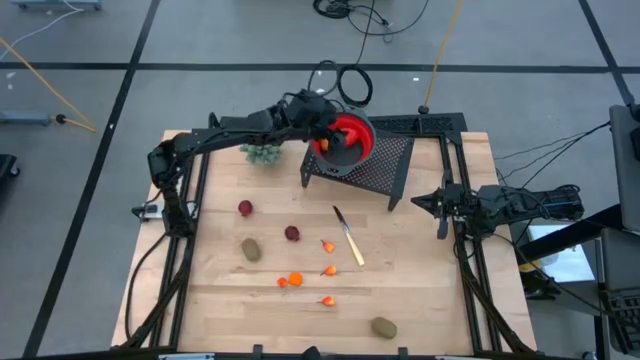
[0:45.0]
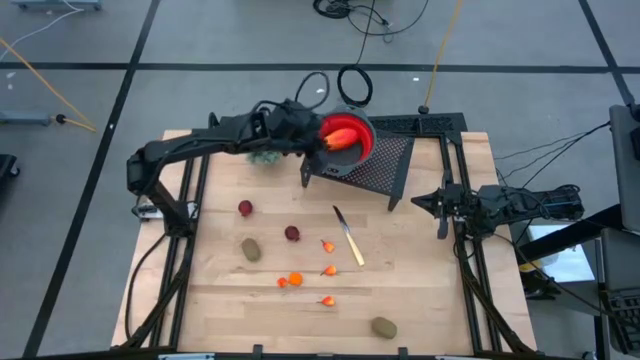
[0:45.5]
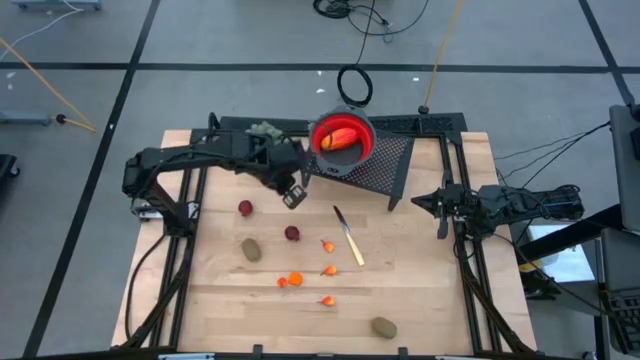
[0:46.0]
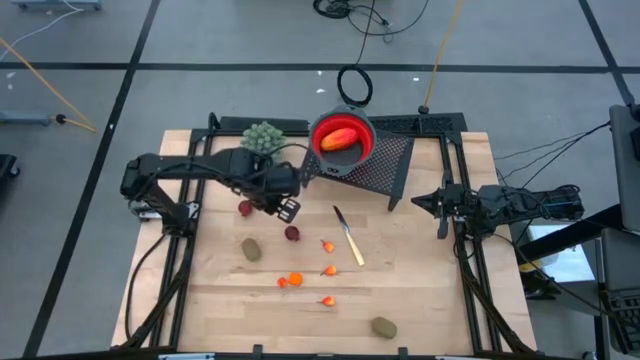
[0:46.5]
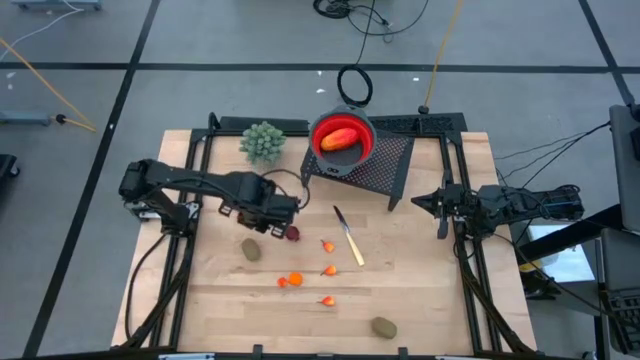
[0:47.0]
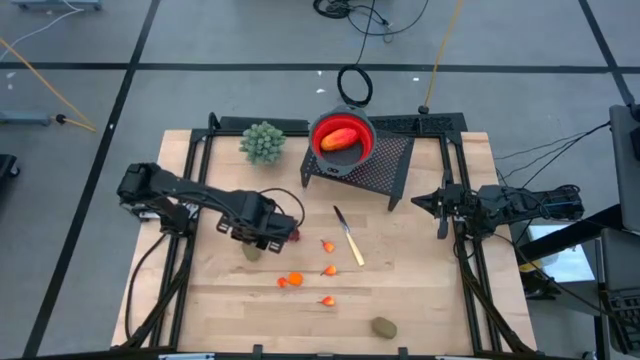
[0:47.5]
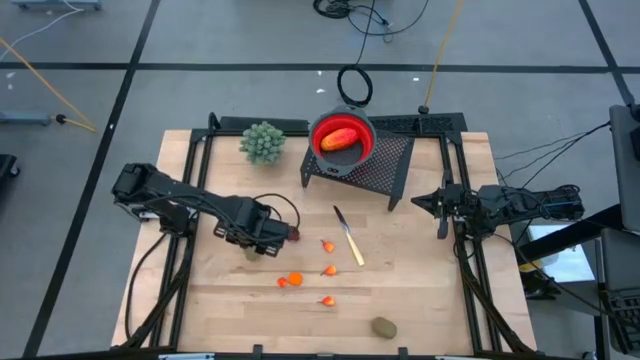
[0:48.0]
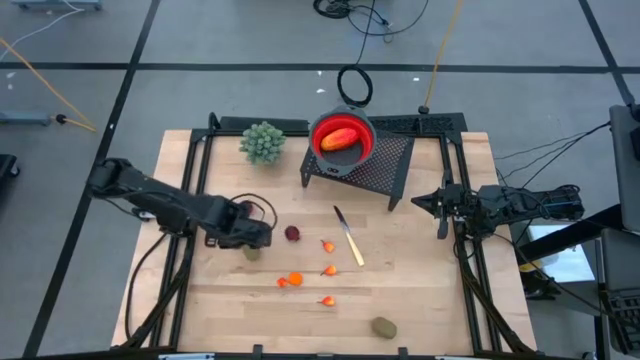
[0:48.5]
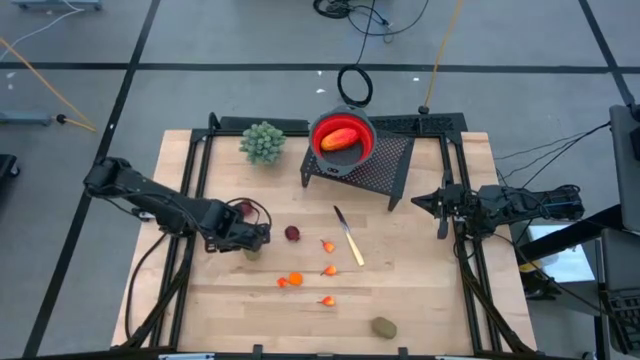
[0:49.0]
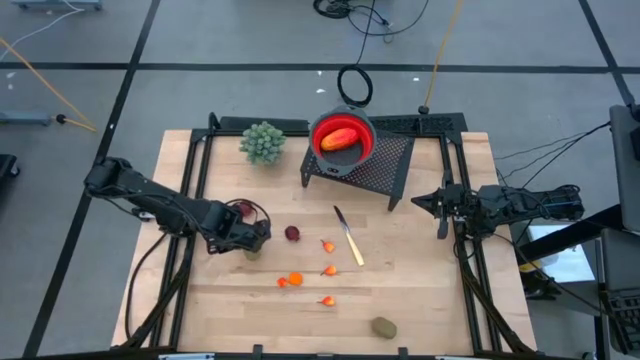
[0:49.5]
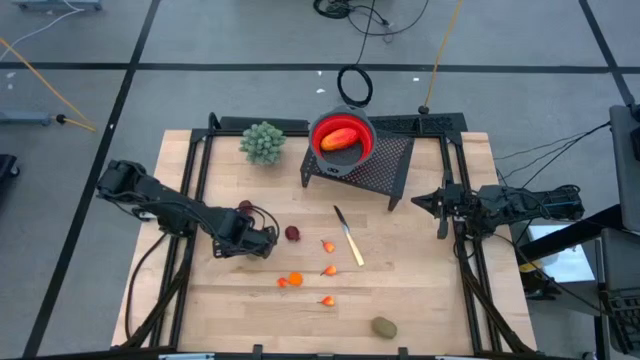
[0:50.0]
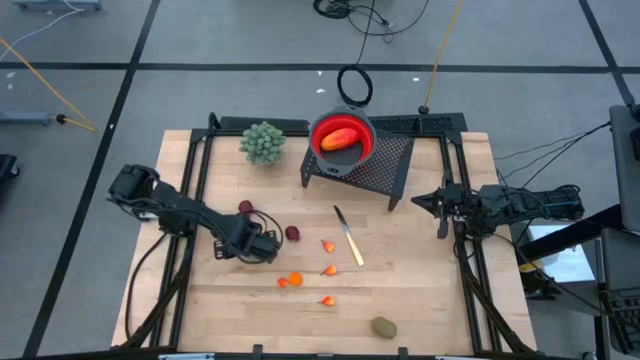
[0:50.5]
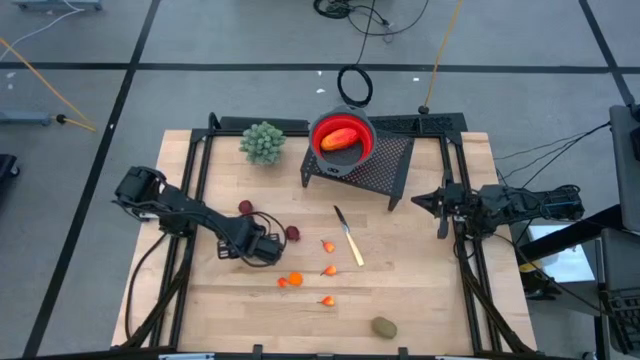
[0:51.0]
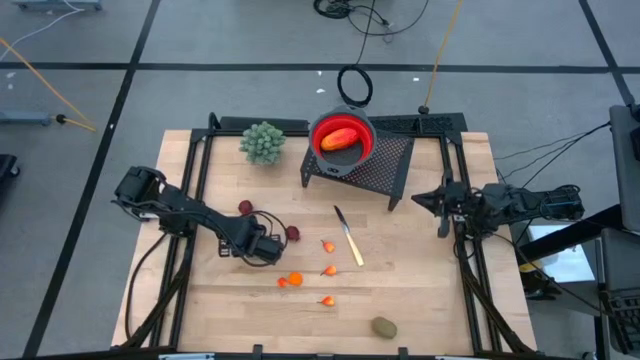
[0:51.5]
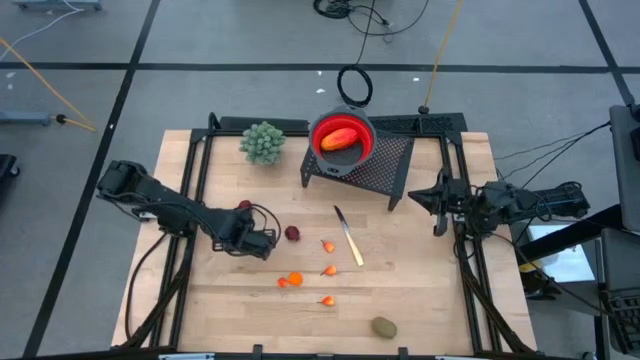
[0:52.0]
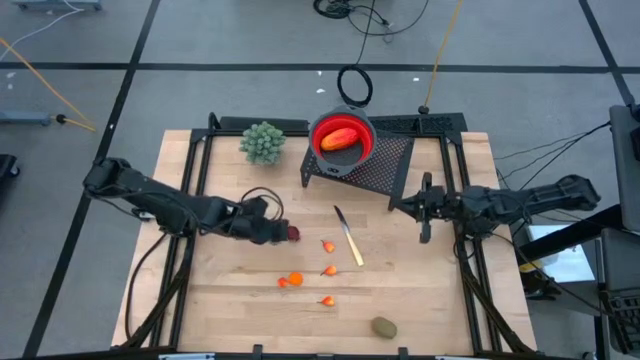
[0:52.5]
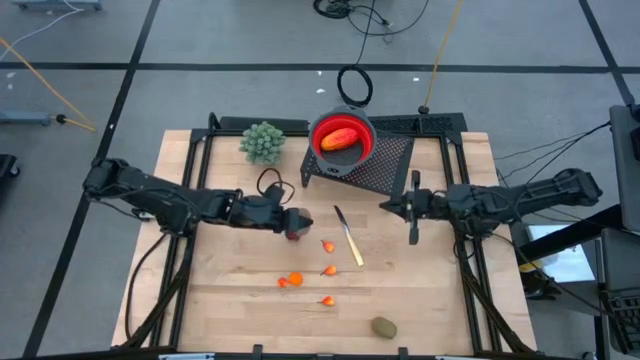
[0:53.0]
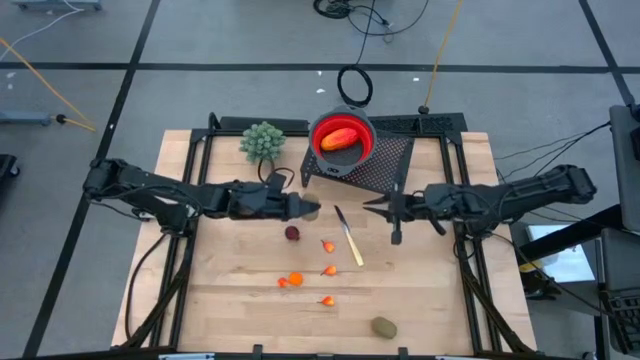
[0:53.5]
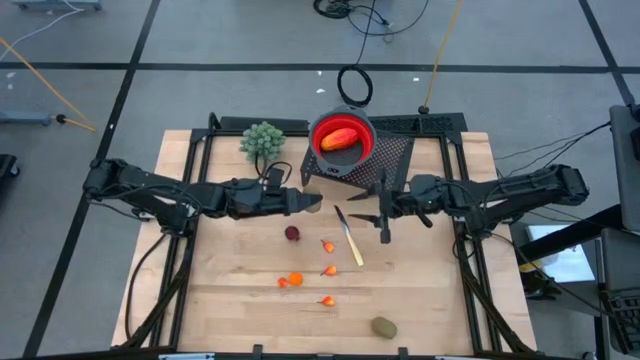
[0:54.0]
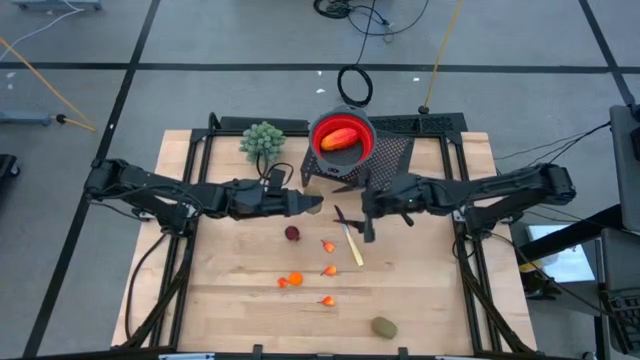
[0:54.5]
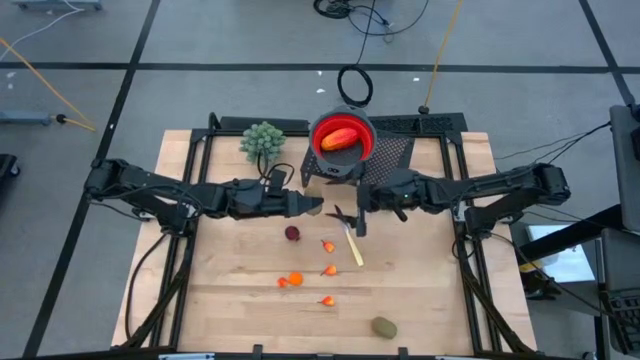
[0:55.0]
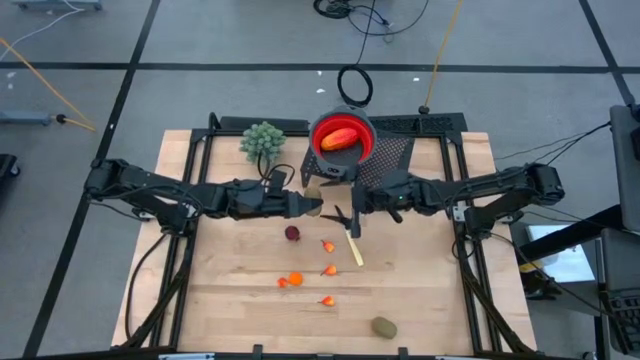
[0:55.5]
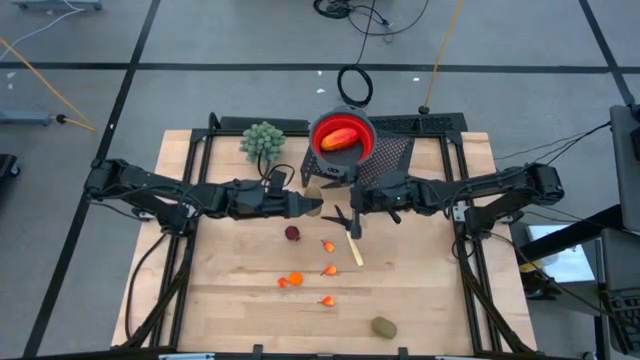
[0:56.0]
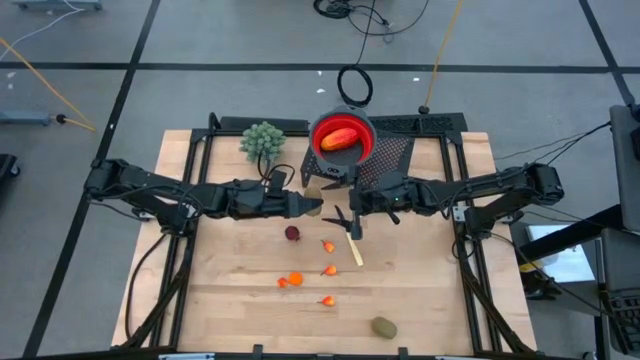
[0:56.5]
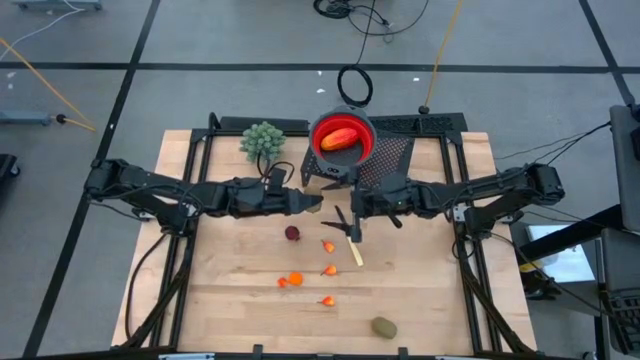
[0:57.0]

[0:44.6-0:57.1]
Task: Pick & Place Fruit
Put the green kiwi into the red strainer bowl on the shelf
